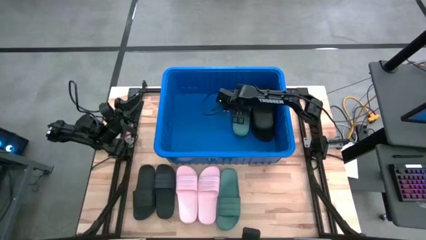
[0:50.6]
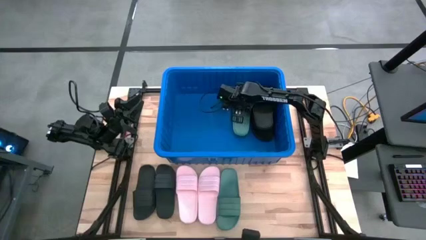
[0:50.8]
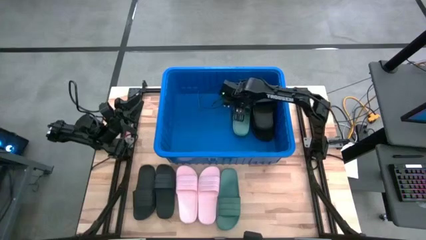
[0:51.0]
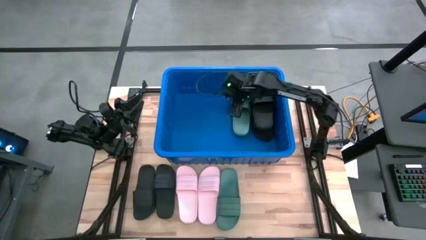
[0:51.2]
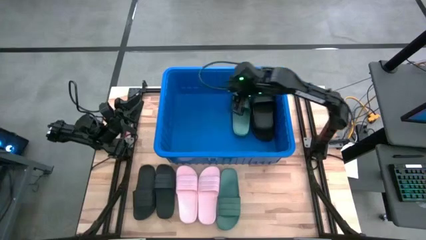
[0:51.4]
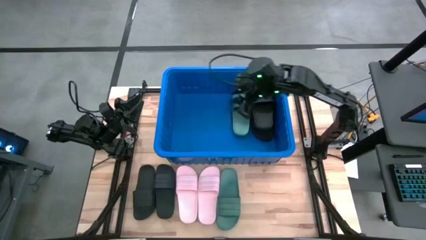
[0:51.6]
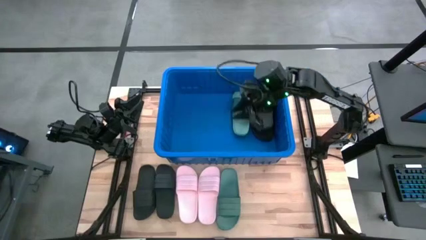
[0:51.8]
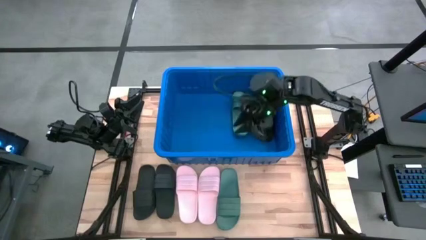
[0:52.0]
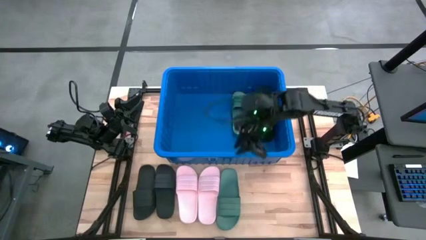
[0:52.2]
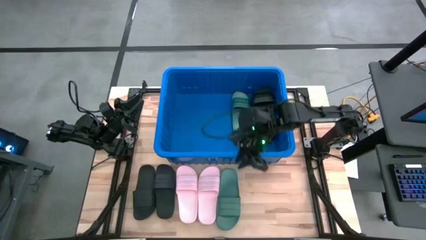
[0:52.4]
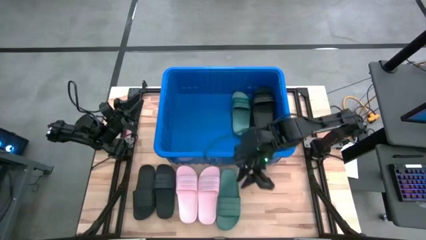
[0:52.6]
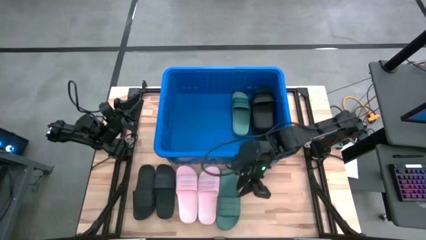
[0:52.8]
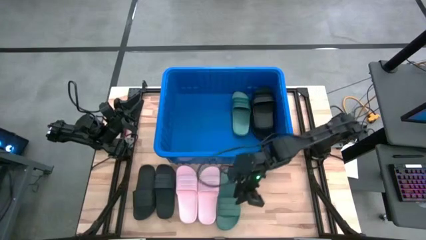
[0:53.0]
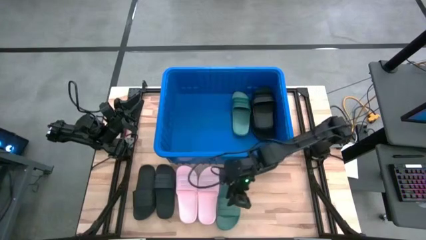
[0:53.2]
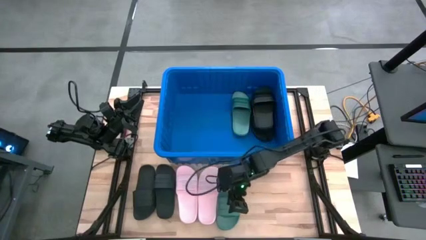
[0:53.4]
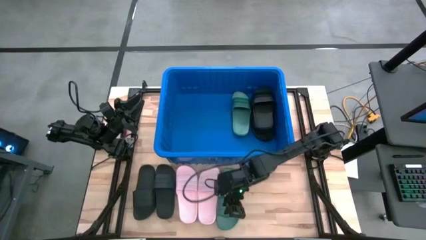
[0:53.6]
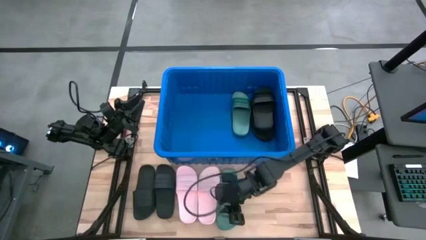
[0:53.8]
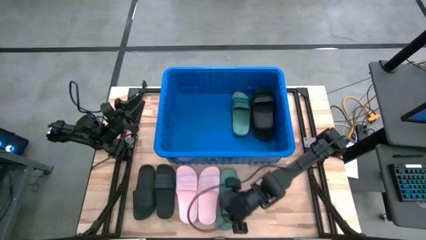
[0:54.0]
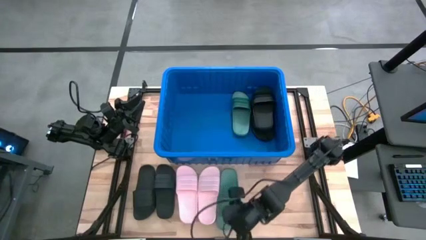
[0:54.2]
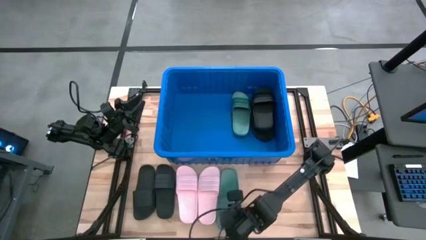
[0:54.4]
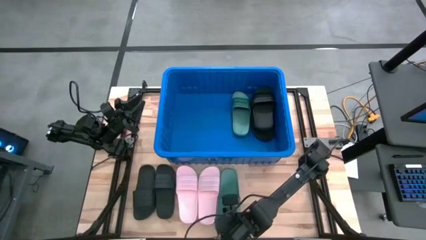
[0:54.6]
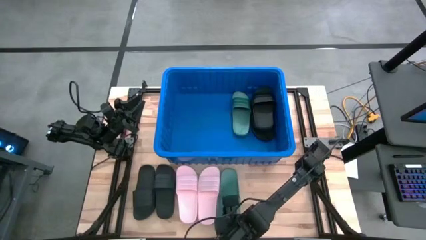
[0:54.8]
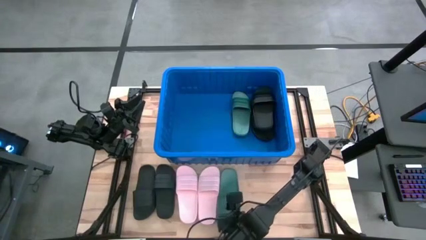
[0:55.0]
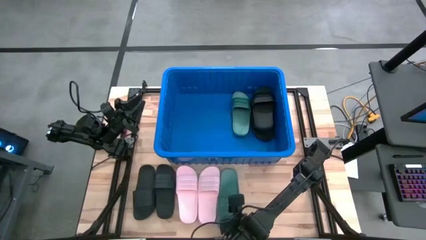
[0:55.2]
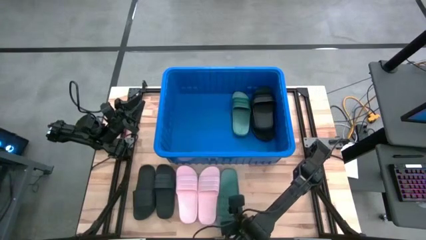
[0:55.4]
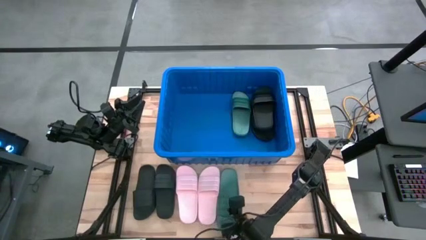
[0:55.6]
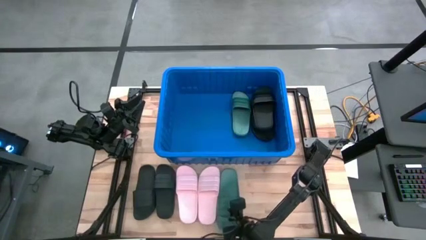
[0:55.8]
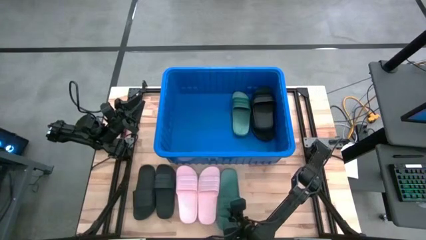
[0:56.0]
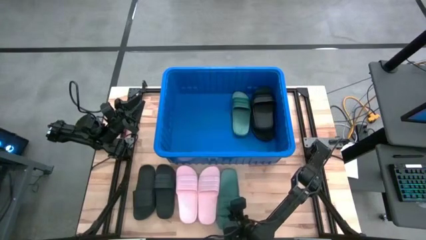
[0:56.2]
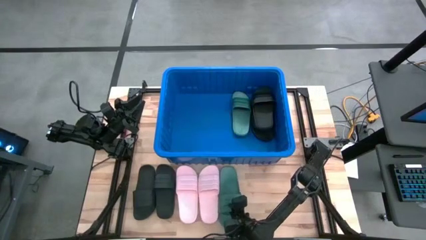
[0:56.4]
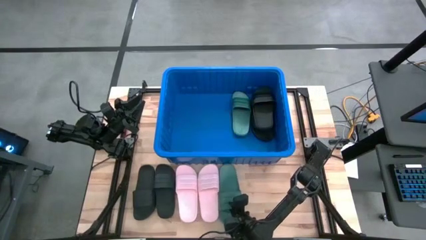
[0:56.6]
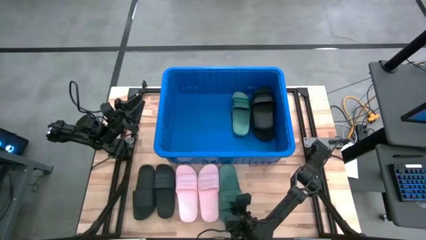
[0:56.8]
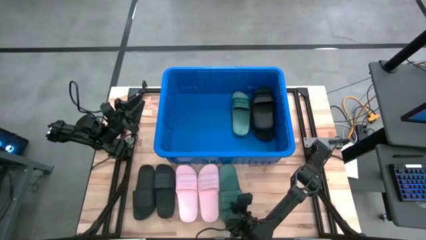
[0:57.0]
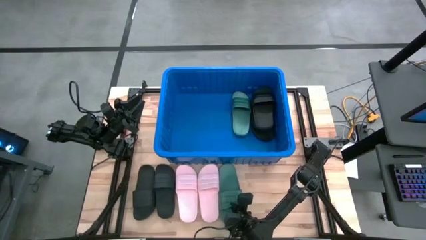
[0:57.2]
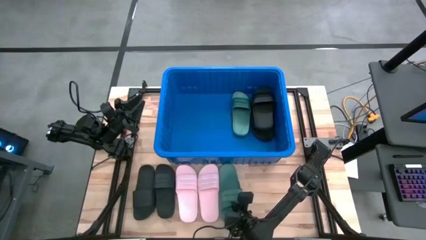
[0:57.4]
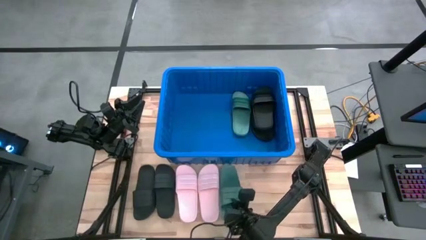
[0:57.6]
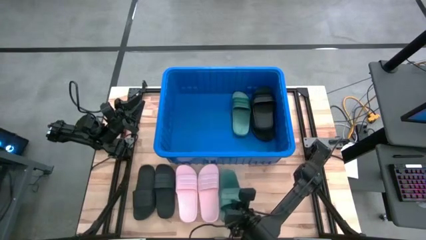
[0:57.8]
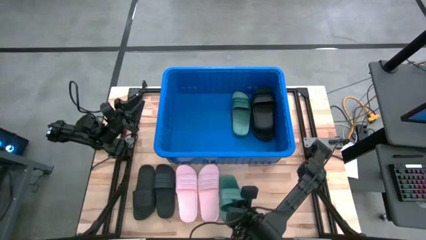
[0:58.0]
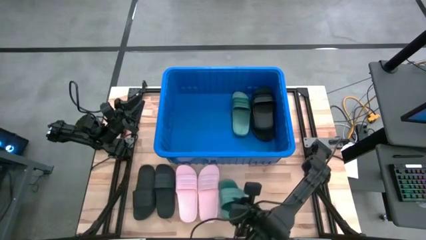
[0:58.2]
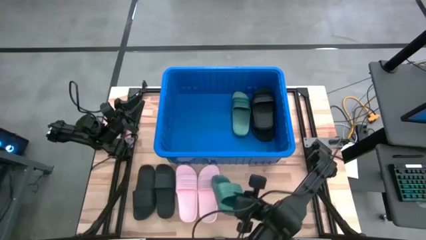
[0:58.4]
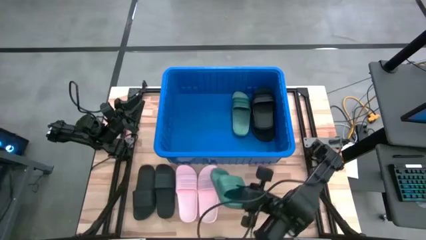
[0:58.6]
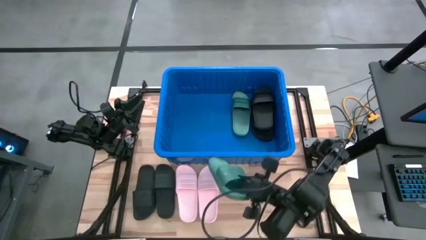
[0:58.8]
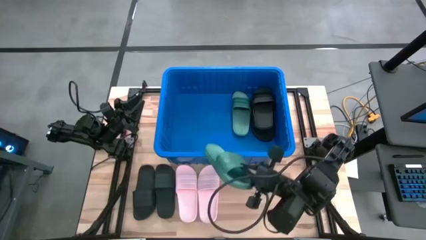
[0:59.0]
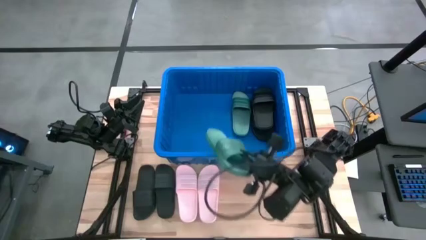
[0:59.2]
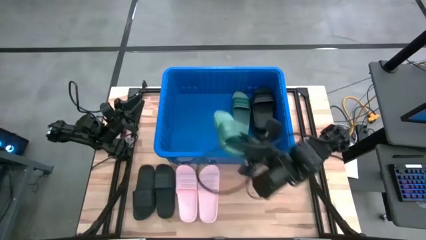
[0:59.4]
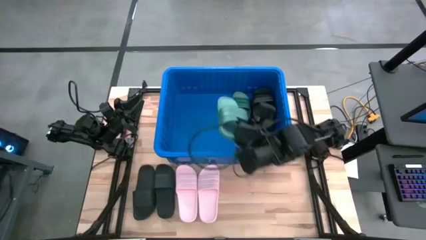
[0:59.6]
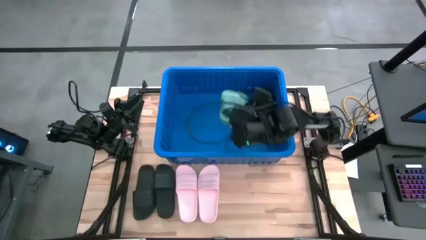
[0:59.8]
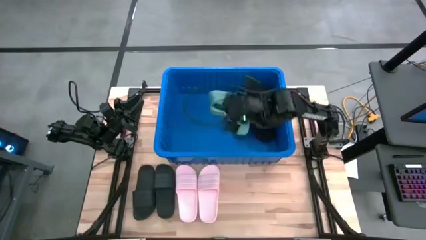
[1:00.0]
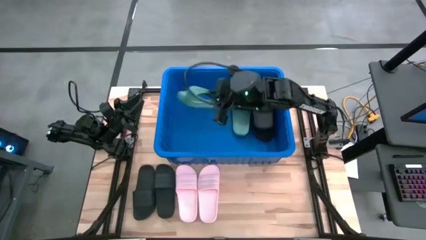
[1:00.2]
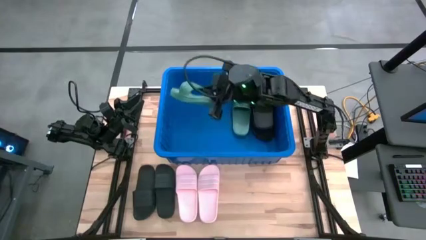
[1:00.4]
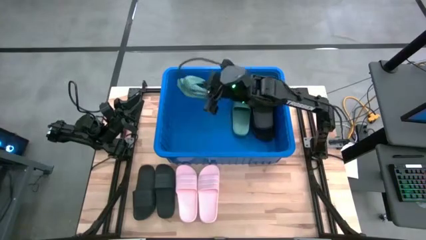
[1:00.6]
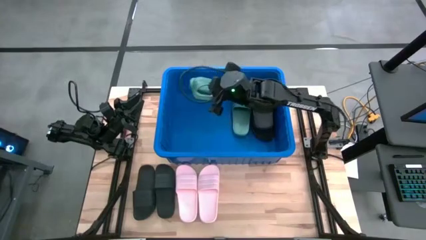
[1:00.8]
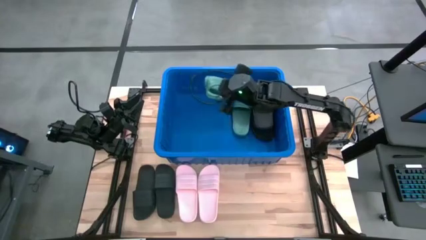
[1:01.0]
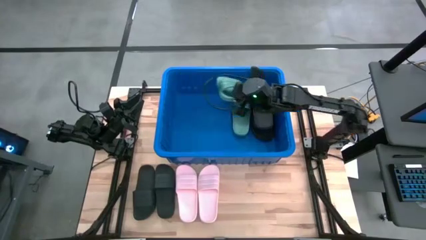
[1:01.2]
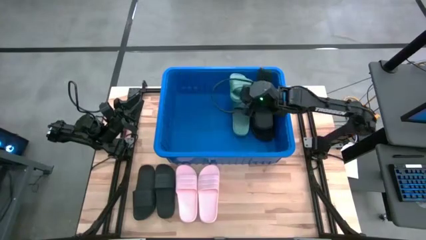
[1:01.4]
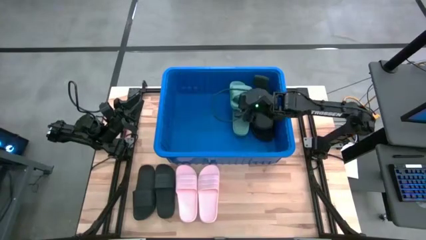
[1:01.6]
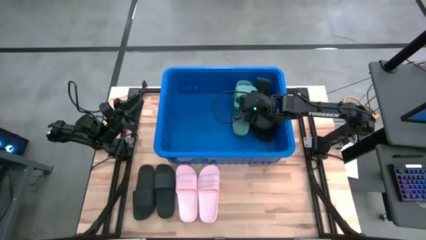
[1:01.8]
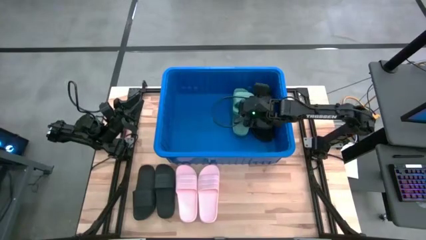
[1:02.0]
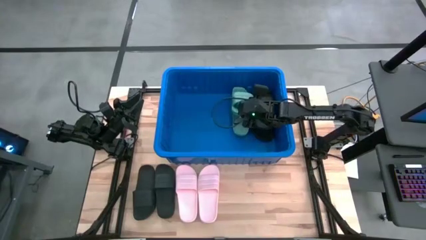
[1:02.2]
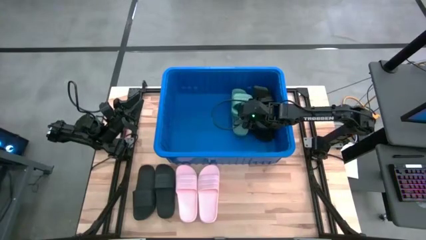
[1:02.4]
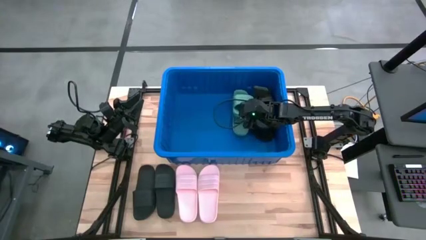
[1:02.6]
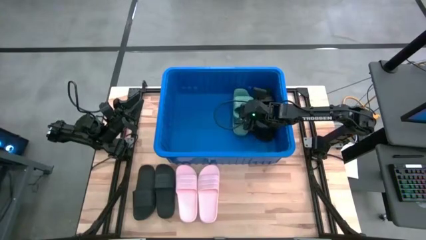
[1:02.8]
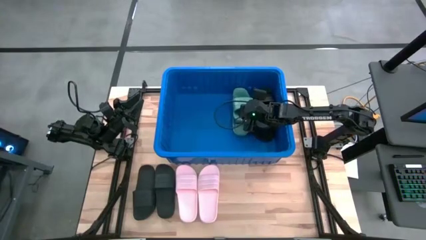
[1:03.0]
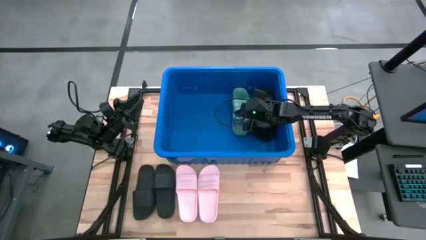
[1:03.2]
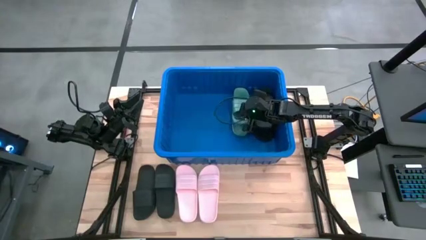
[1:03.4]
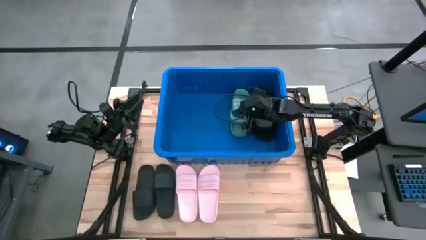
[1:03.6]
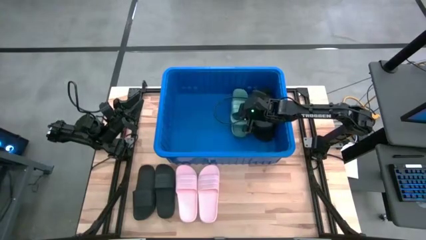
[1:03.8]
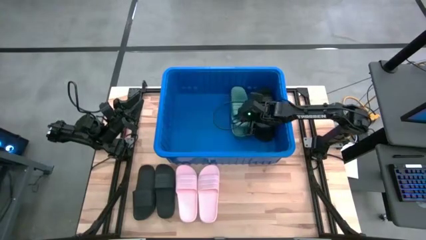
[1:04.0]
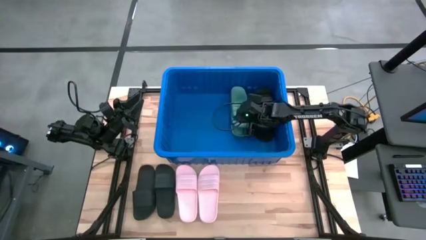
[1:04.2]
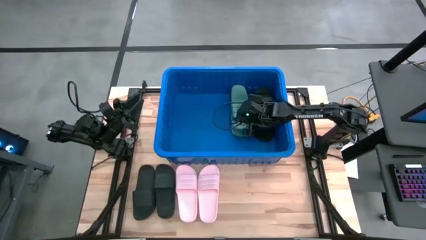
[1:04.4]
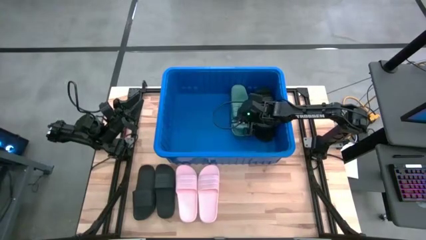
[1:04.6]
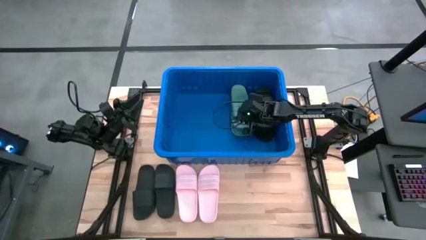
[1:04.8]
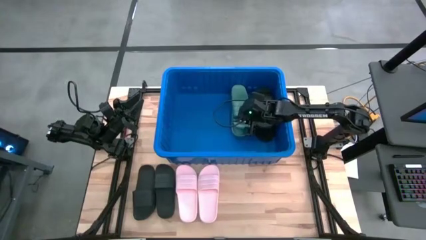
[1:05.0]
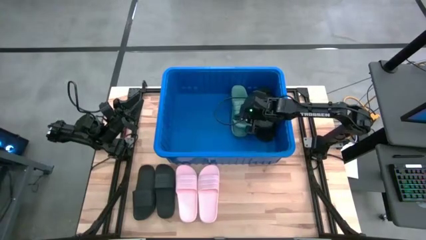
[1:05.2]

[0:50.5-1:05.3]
Task: Pick and place slides into bin
Put the green slide into the bin
